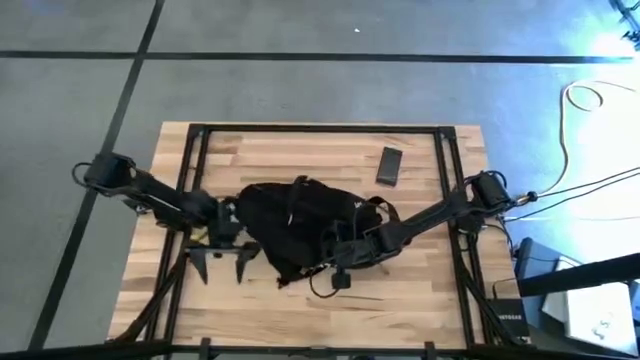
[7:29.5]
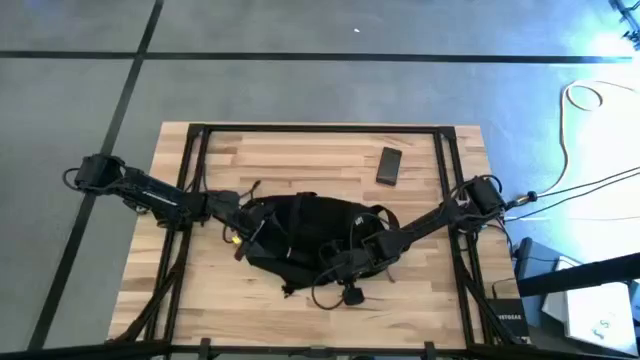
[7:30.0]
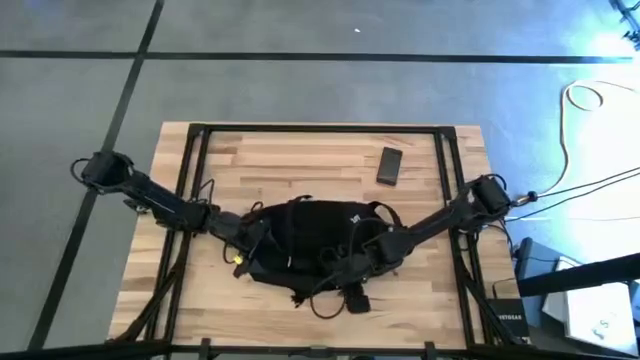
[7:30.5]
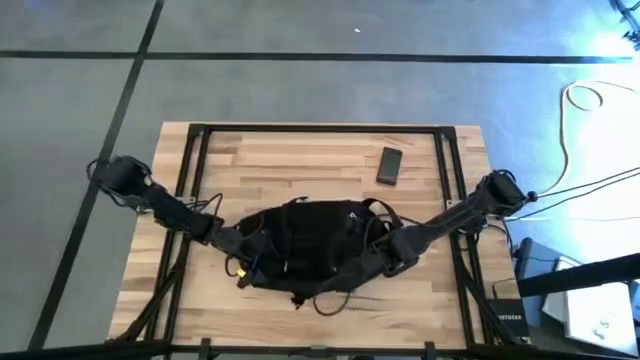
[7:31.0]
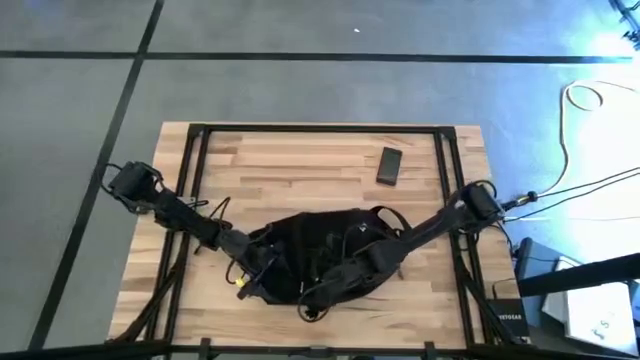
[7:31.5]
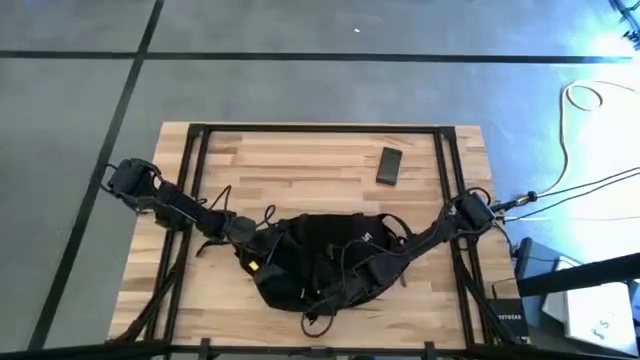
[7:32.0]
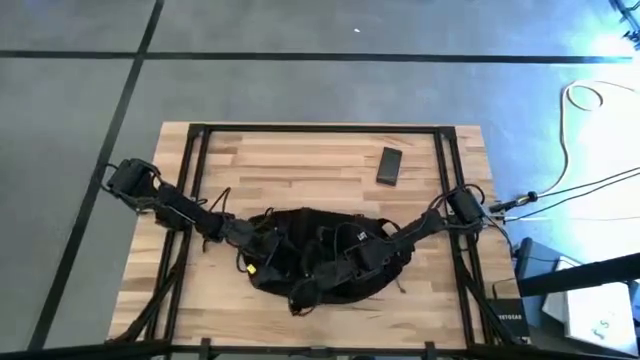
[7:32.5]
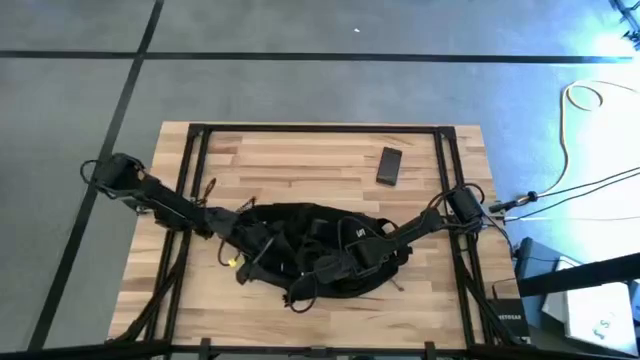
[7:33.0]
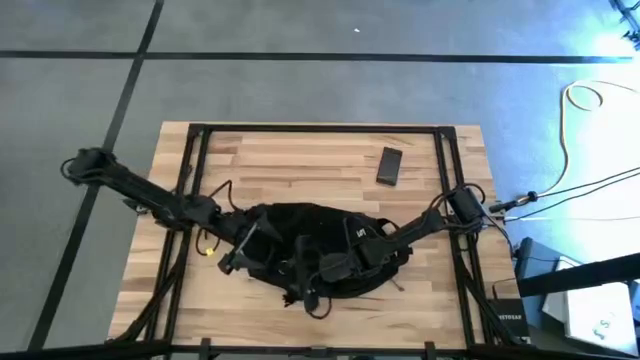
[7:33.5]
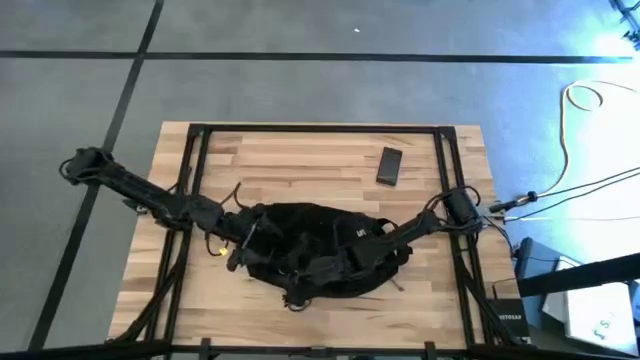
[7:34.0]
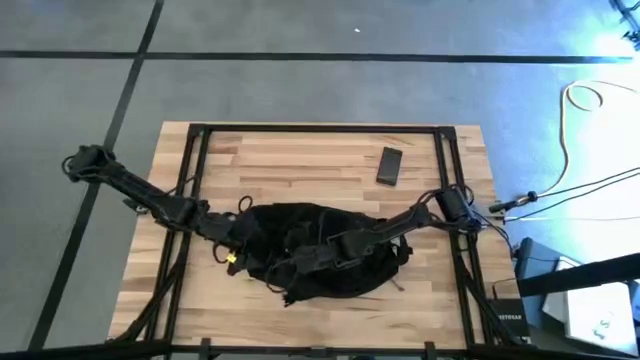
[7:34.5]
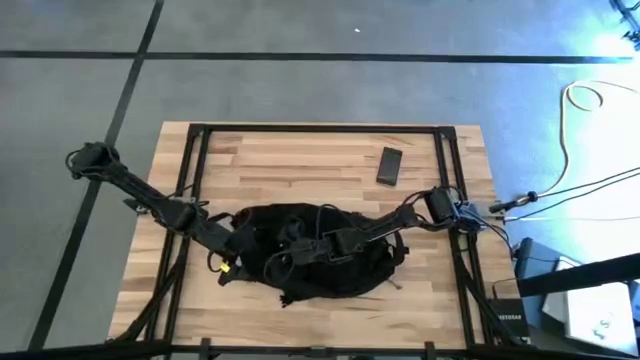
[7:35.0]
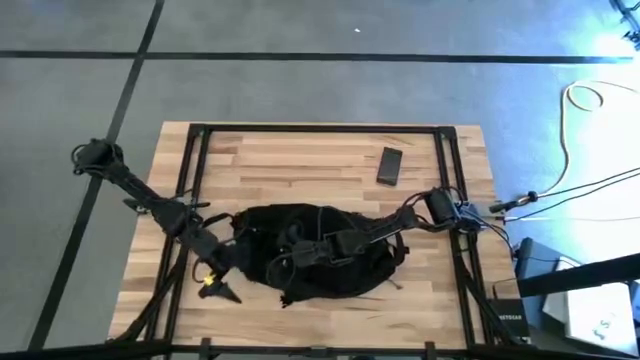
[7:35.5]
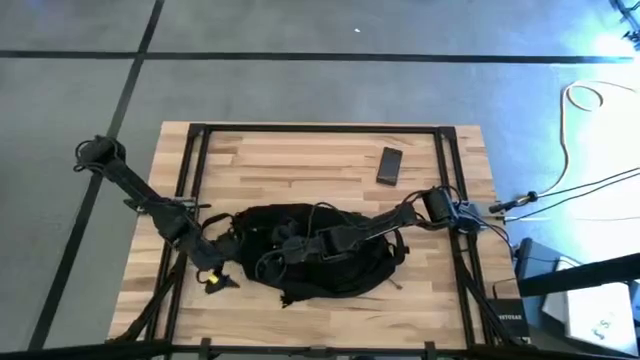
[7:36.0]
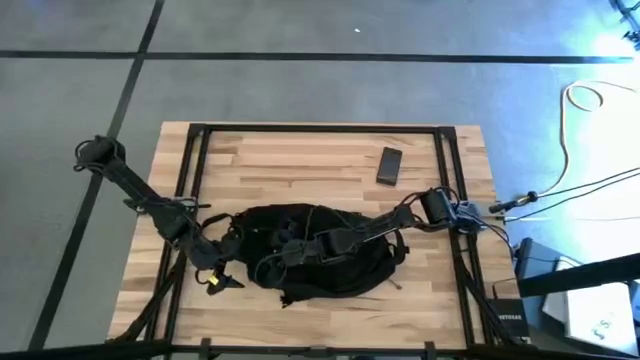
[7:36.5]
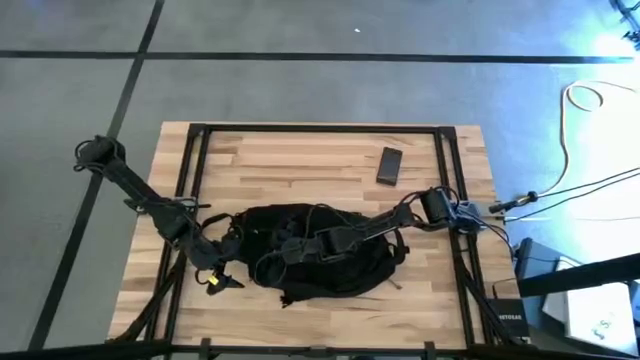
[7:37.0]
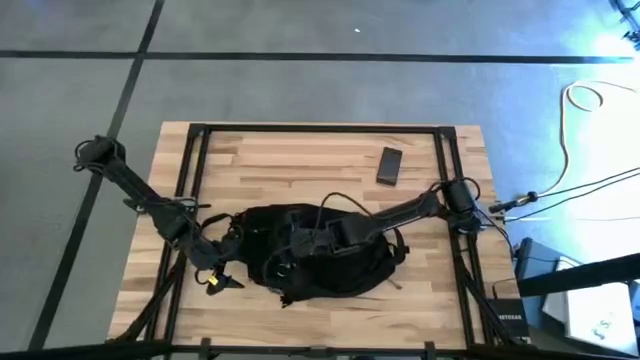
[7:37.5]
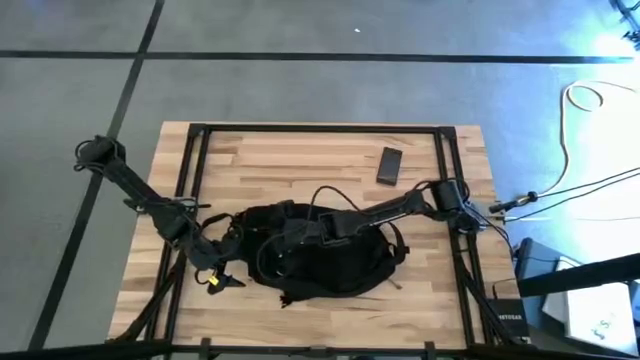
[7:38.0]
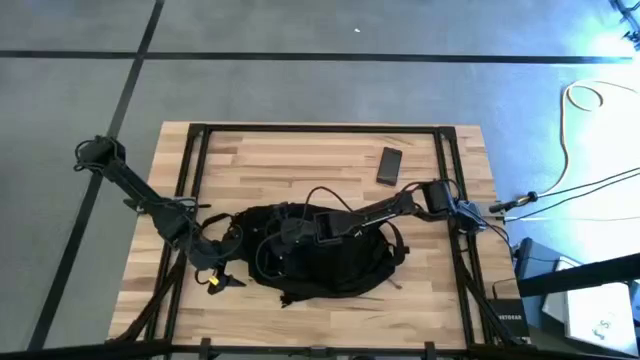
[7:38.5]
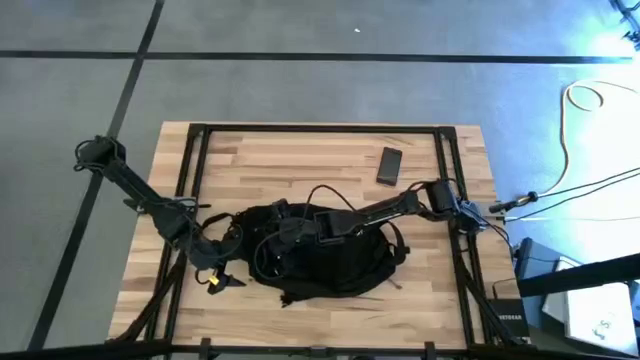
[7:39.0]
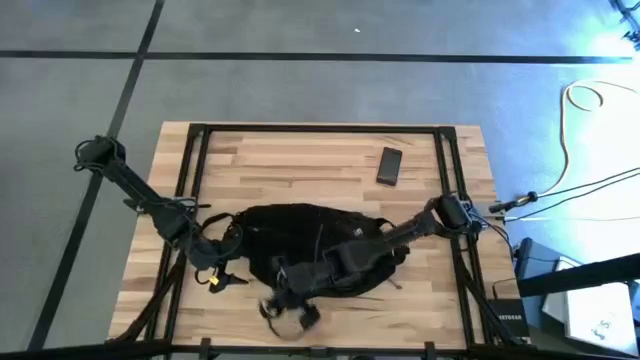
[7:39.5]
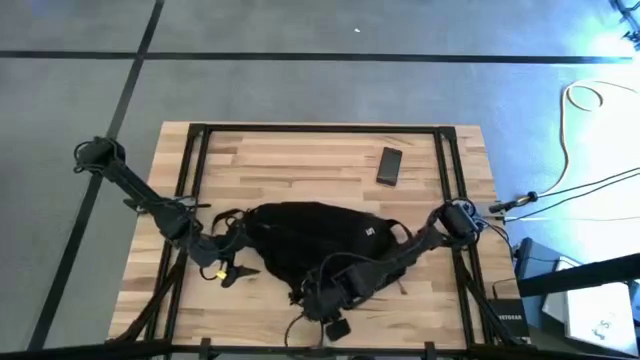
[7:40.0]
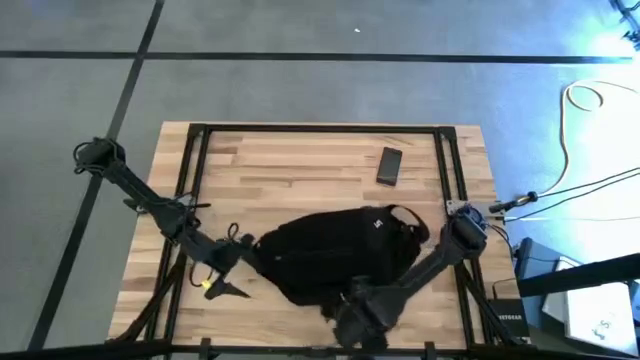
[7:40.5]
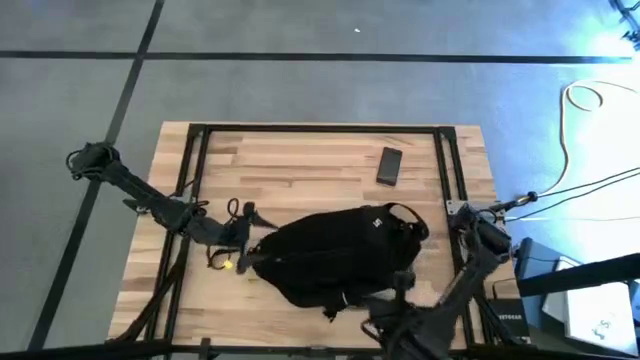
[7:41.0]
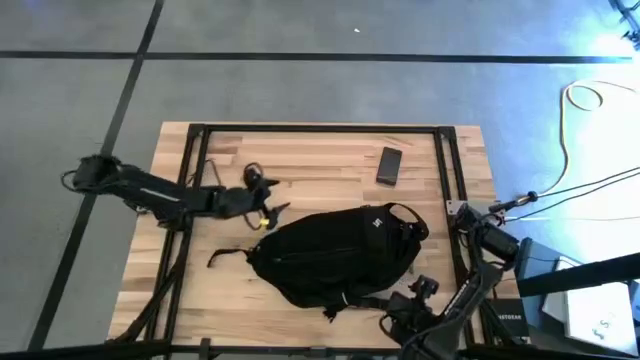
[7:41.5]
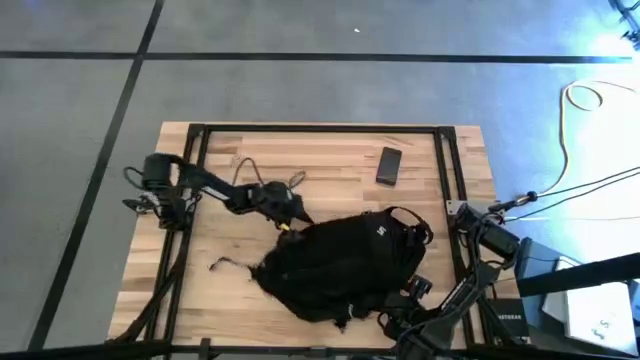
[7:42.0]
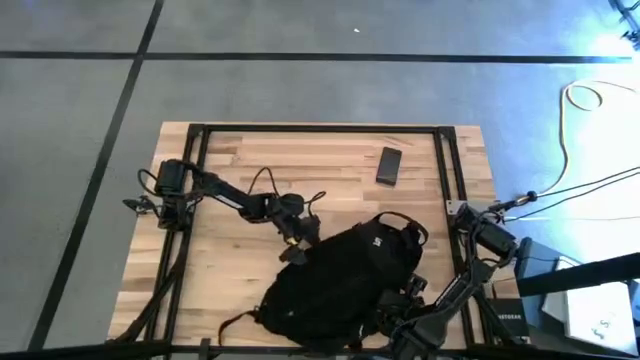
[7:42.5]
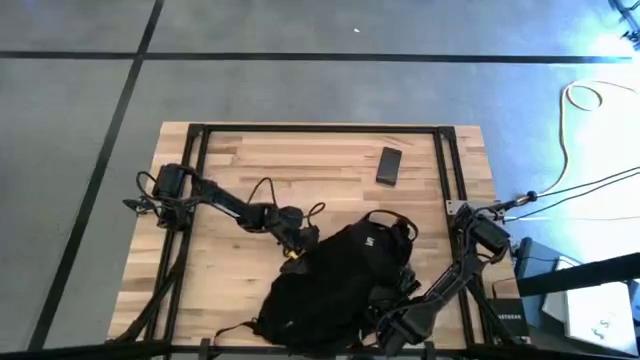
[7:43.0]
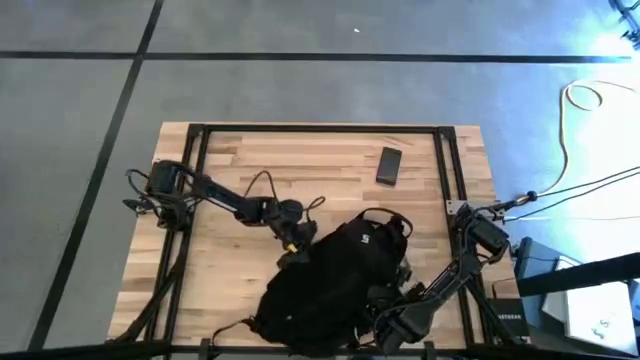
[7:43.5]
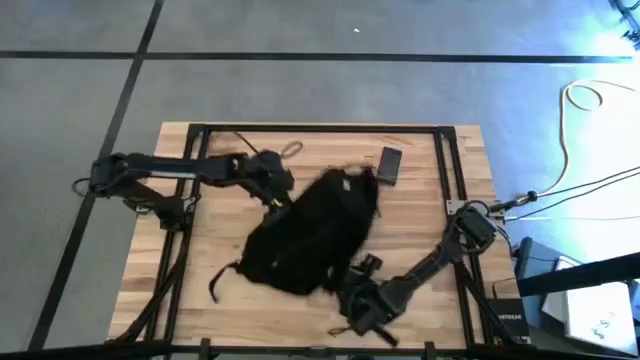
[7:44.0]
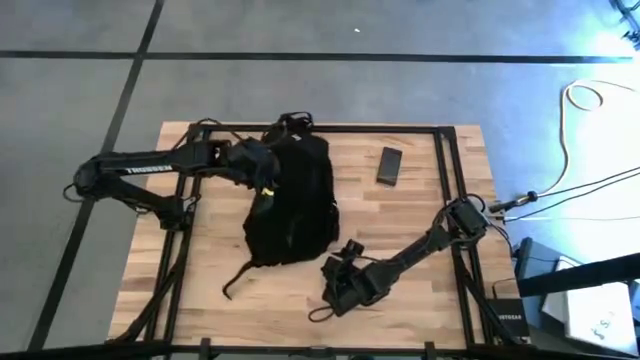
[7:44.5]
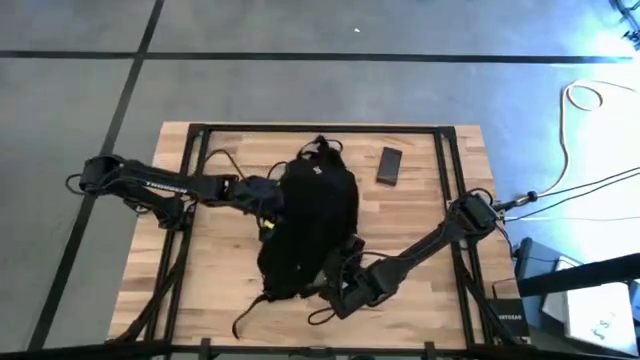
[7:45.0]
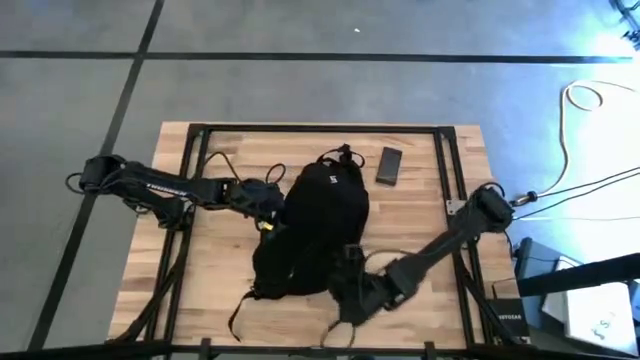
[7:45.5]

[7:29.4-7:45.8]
Task: Unpack backpack
Adjust the black bag
